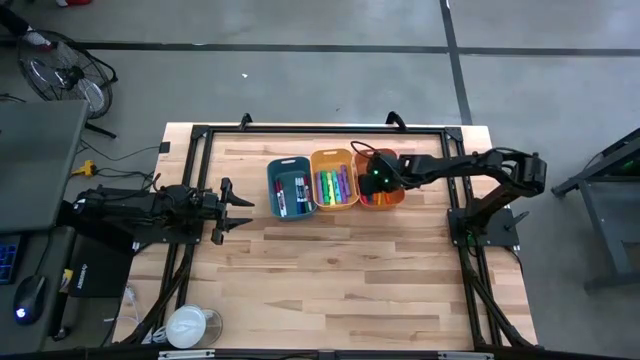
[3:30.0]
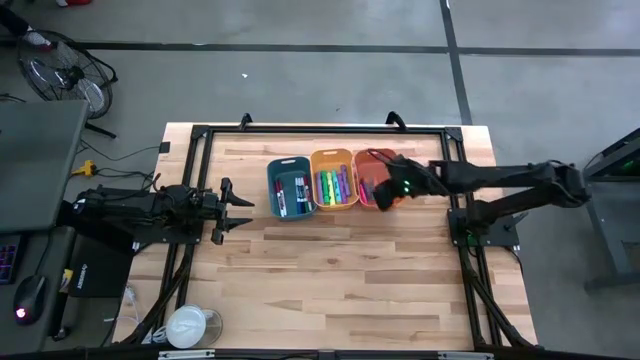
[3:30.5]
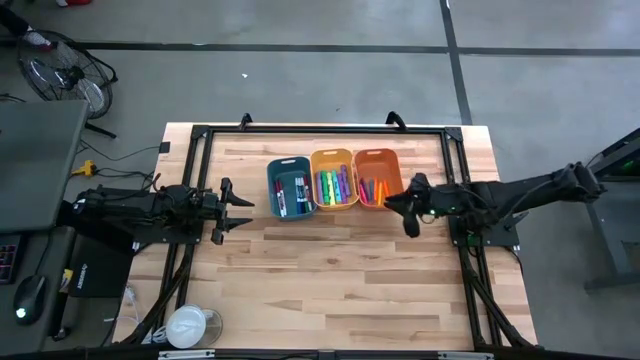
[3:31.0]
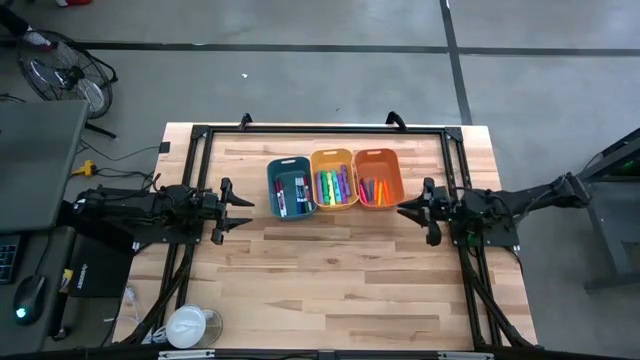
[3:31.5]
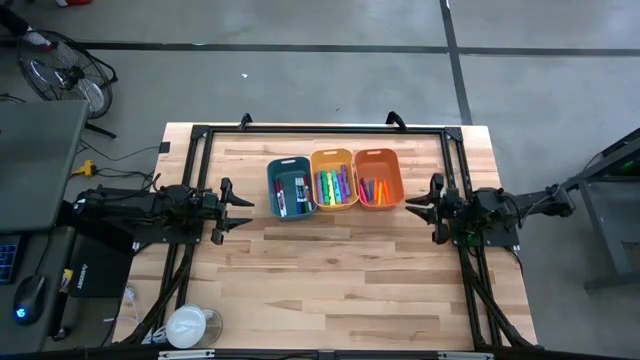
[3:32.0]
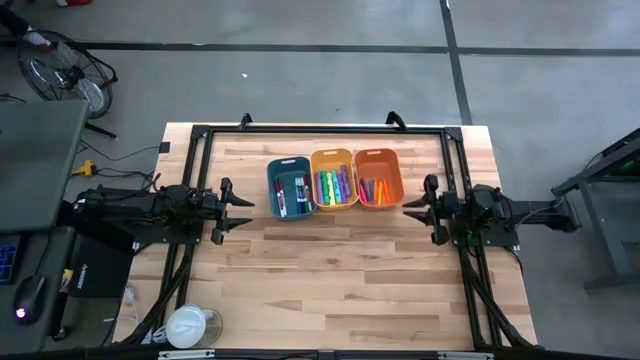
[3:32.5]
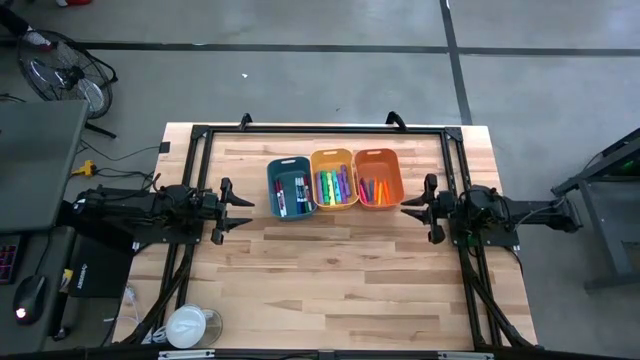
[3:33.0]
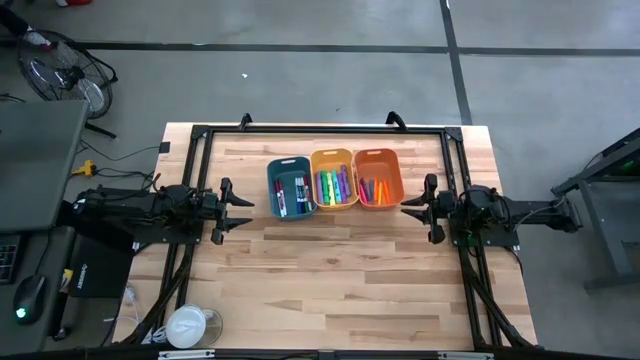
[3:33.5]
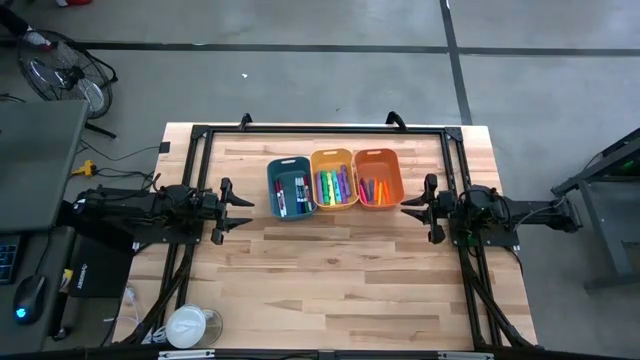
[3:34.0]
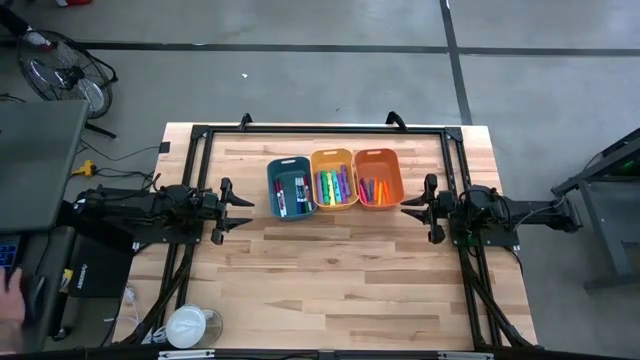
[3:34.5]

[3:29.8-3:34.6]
Task: Pick & Place Markers
Return to Home Position

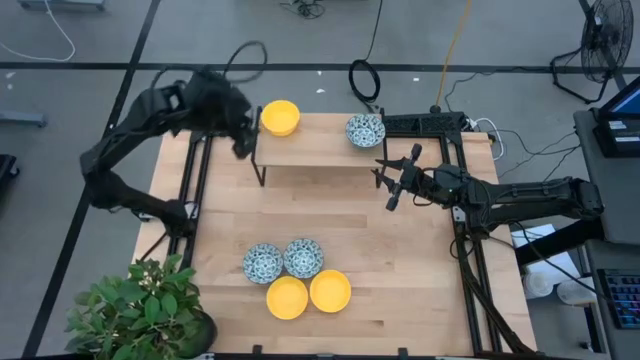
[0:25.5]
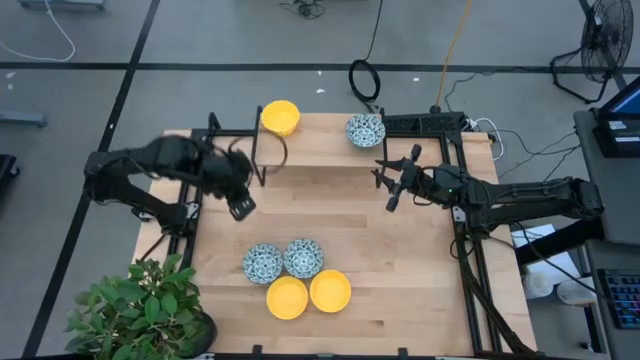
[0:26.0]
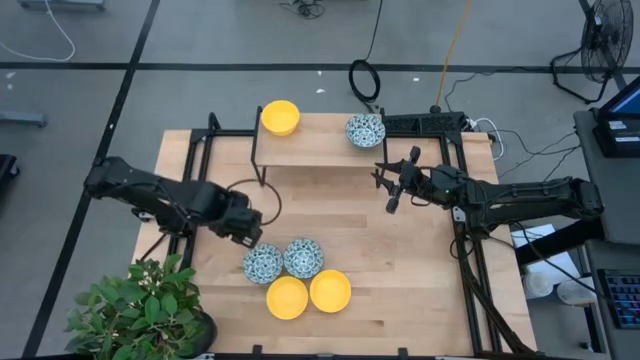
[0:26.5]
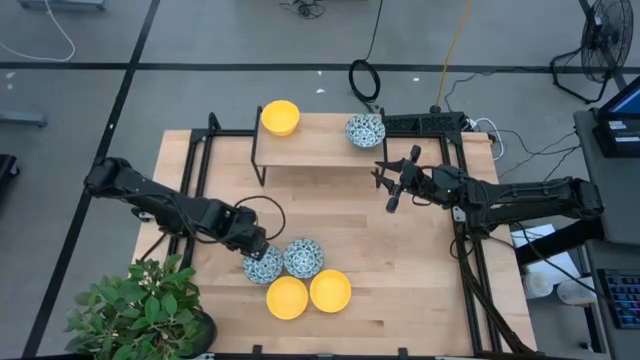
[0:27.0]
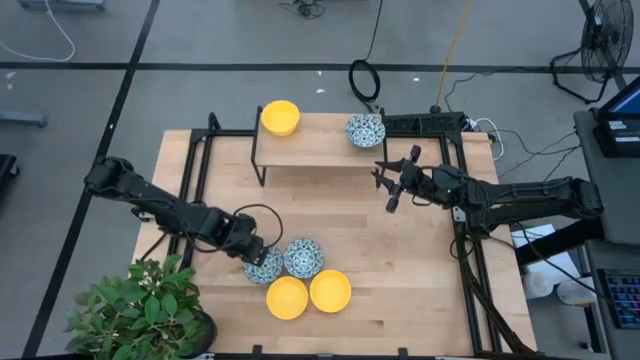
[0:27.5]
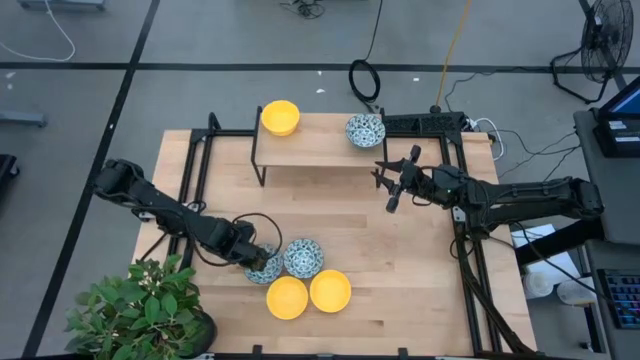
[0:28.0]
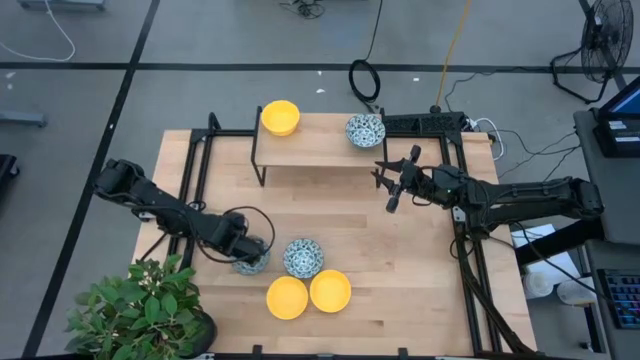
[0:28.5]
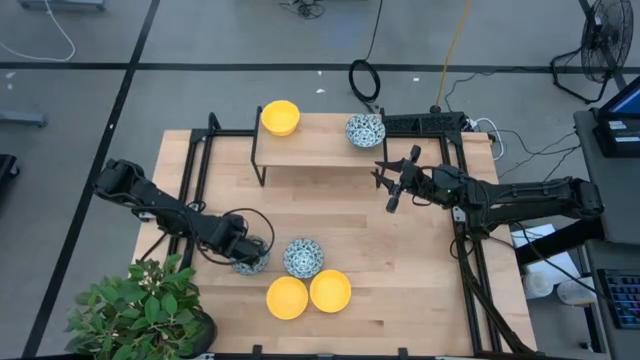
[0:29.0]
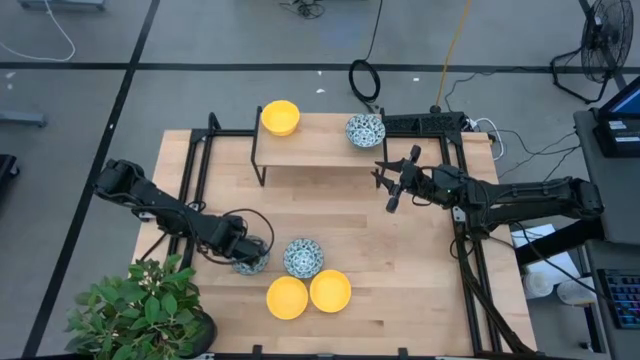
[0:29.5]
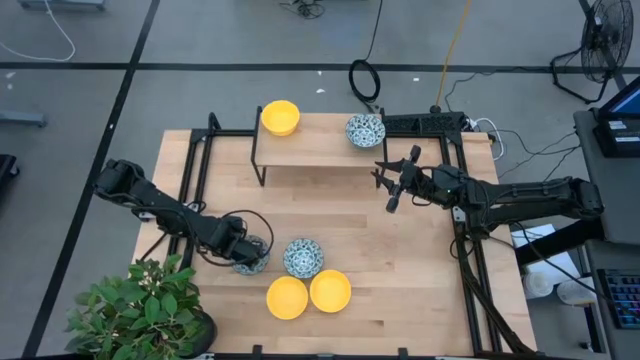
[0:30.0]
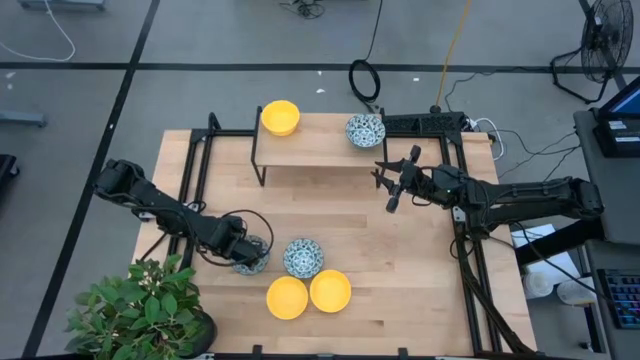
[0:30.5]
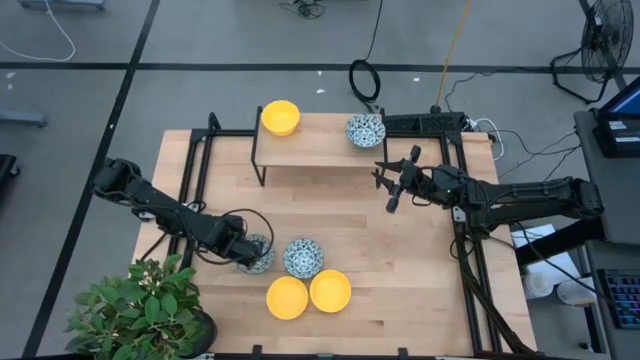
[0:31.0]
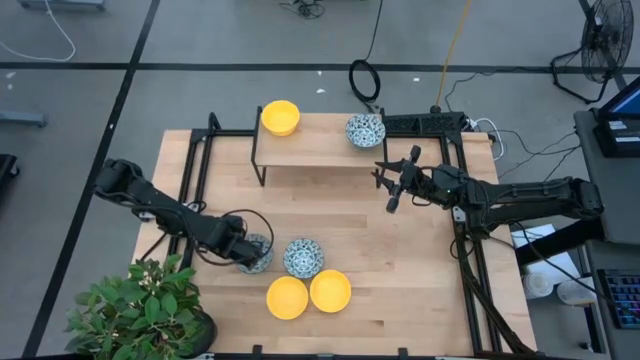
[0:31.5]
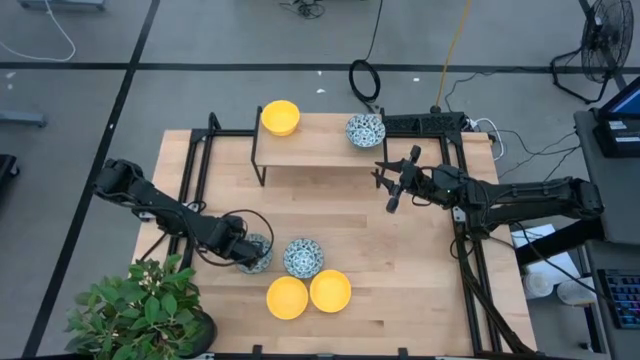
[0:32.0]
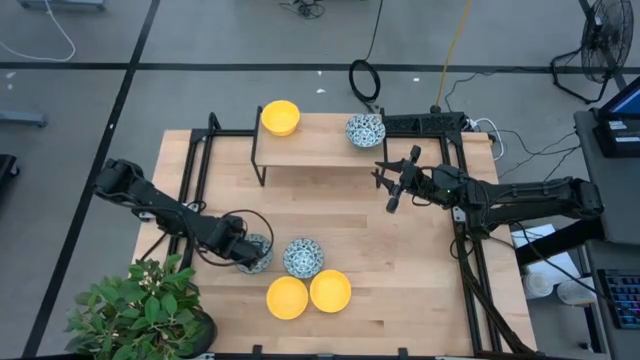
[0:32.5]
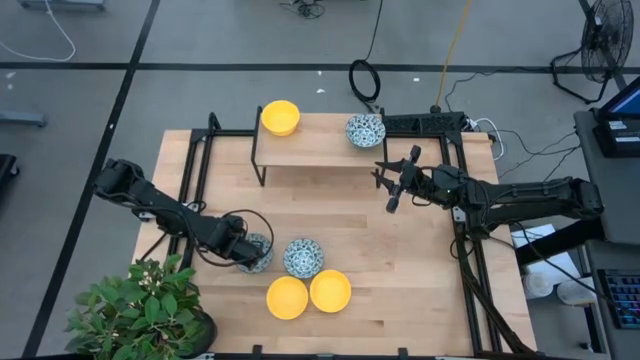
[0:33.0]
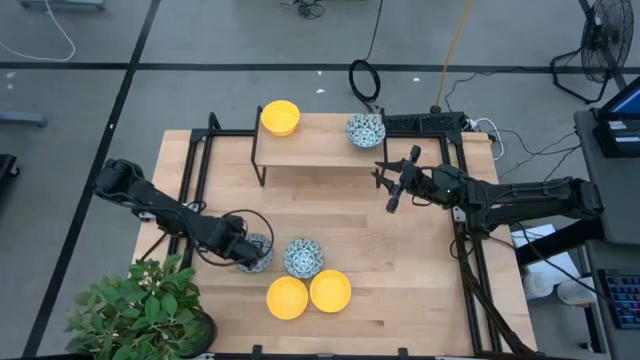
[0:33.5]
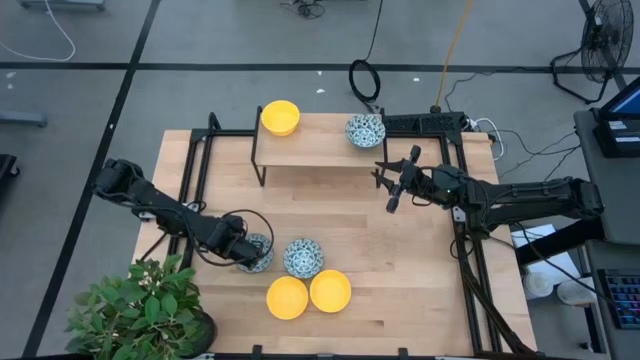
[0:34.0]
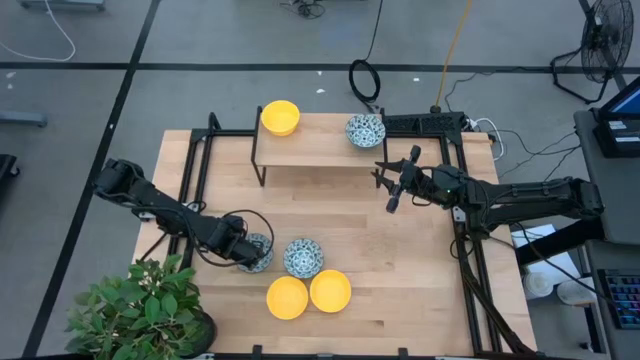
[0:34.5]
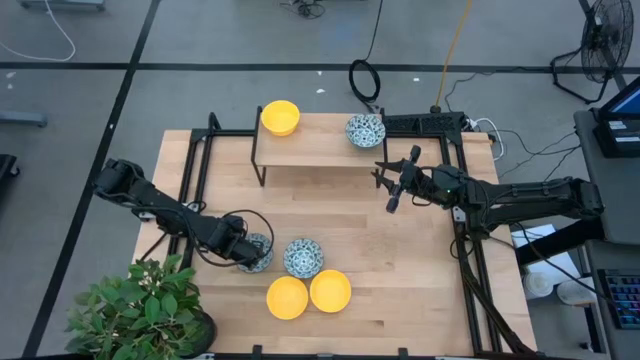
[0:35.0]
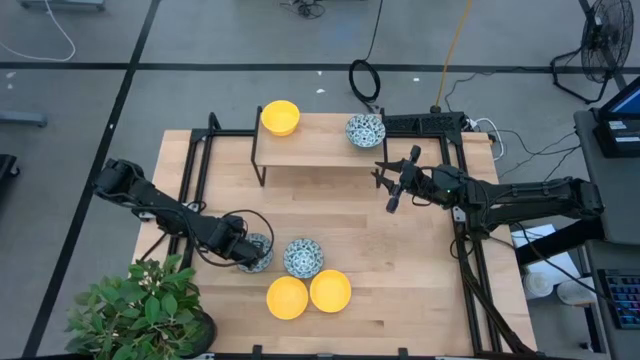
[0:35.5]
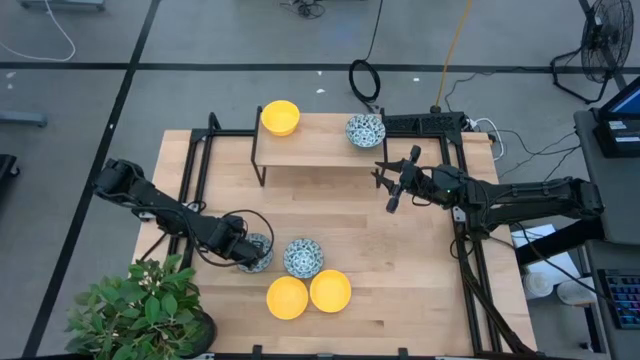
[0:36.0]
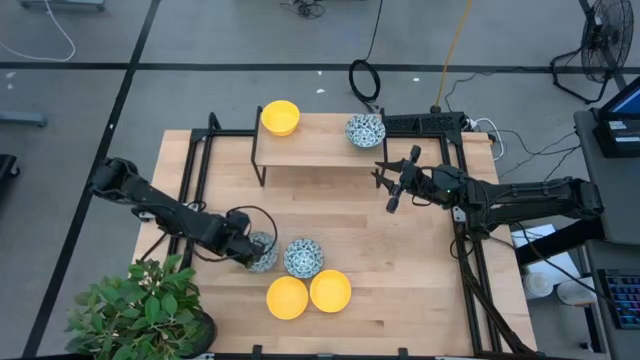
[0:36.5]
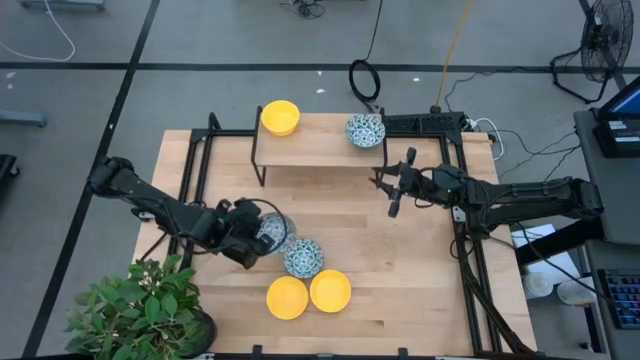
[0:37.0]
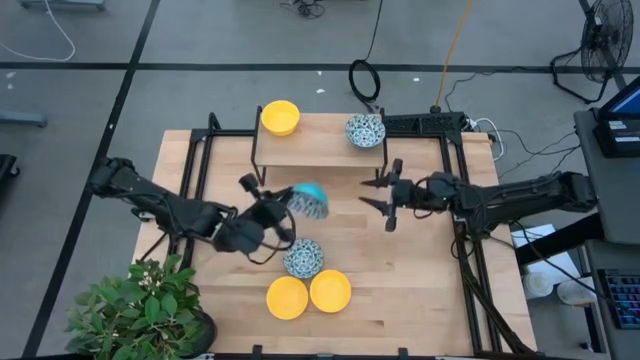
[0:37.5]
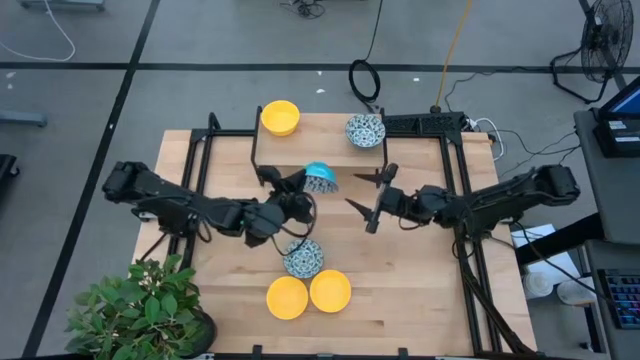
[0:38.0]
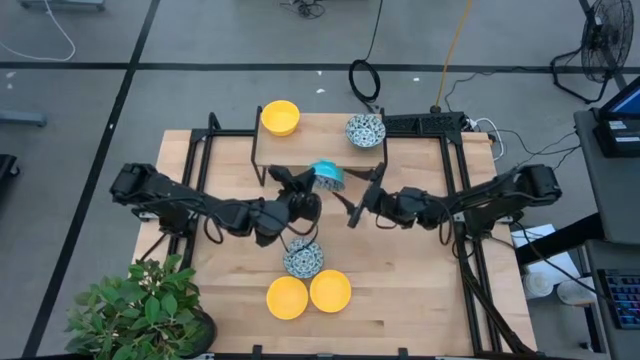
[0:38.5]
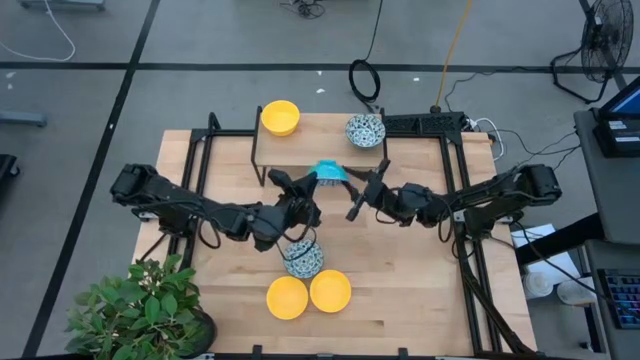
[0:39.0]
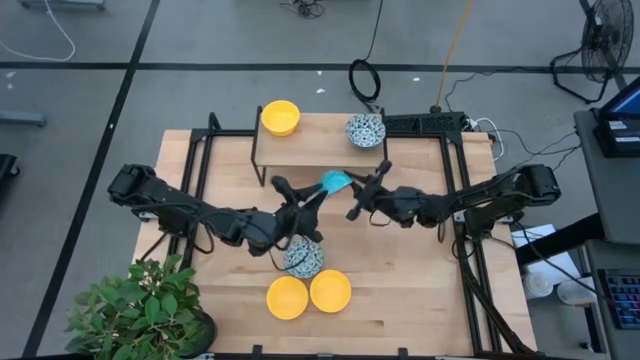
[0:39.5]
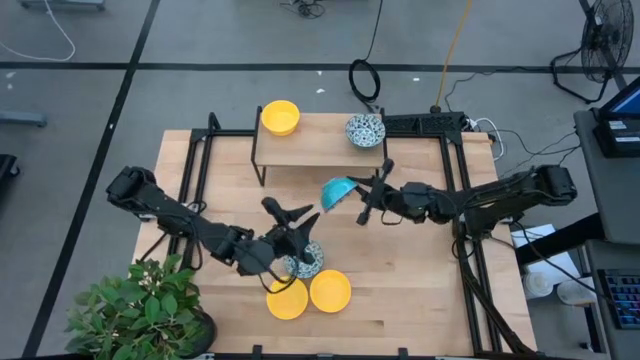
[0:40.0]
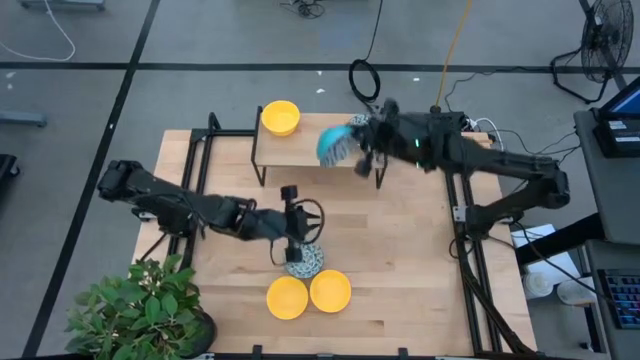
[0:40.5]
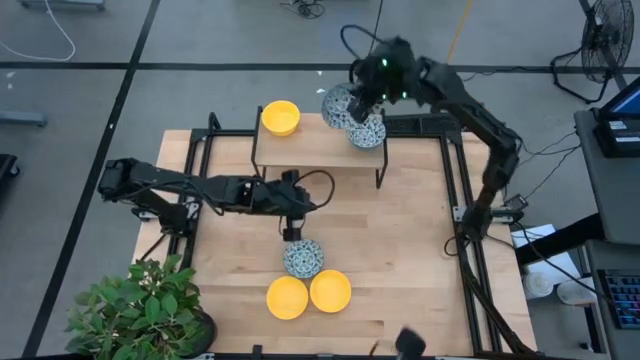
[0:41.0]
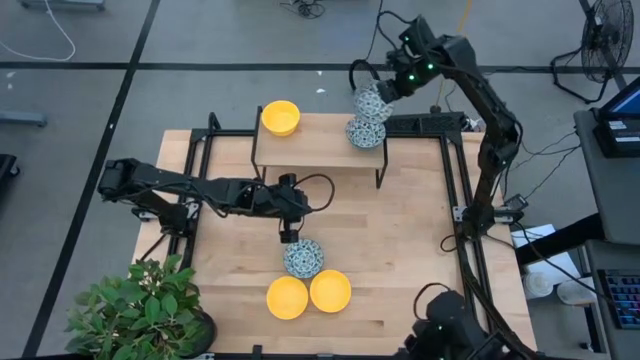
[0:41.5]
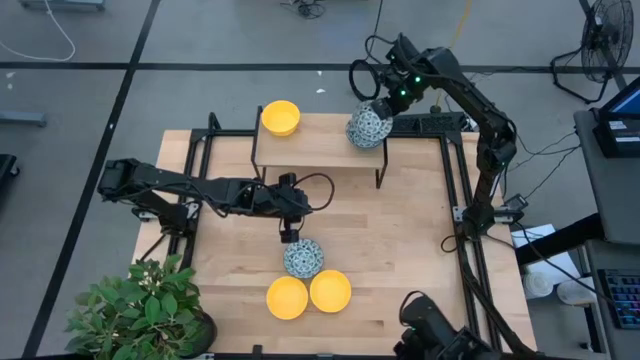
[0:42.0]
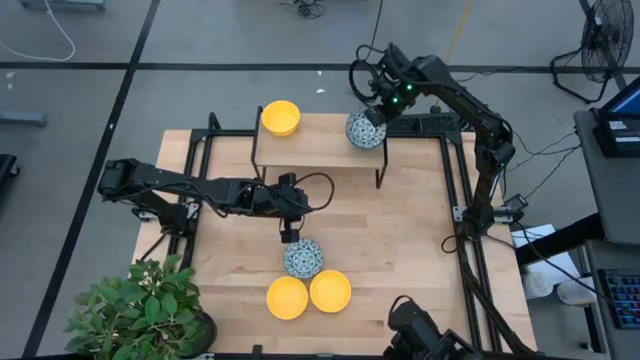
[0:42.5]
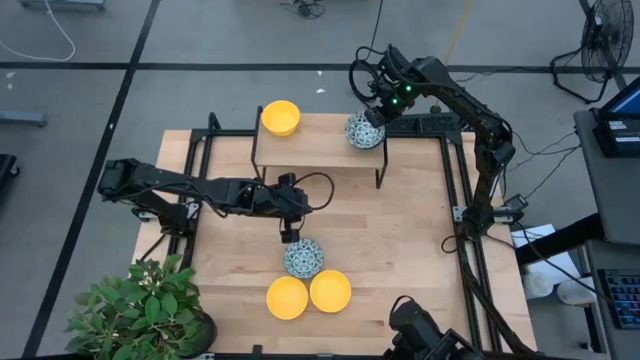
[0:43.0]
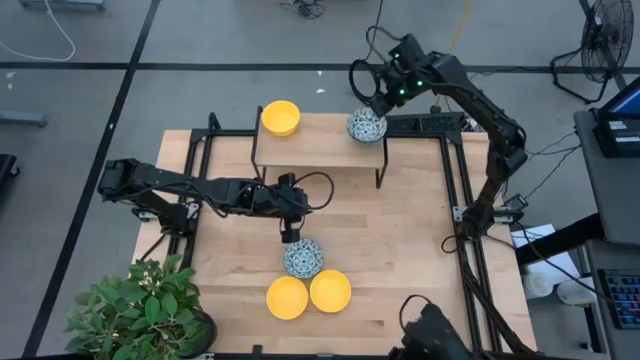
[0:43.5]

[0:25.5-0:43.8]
Task: Pick & Place Mini bowls
Stack the left blue bowl on top of the blue bowl on the shelf
